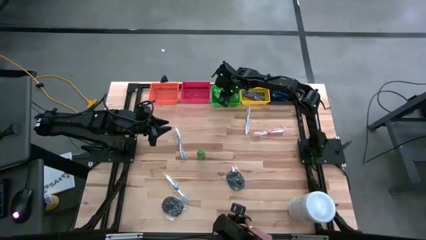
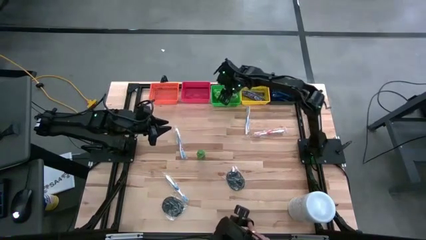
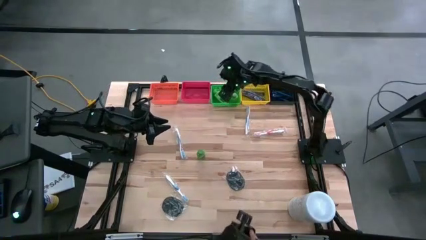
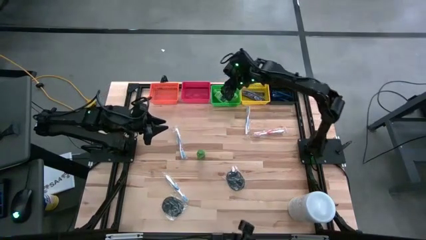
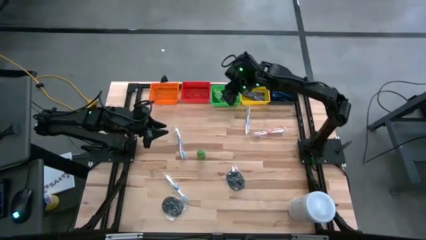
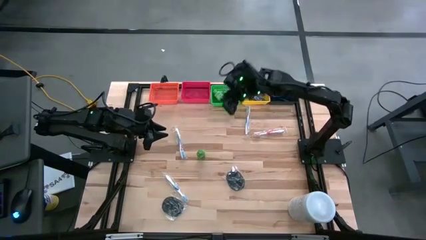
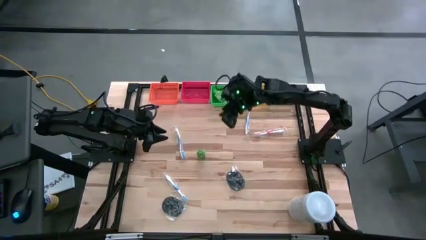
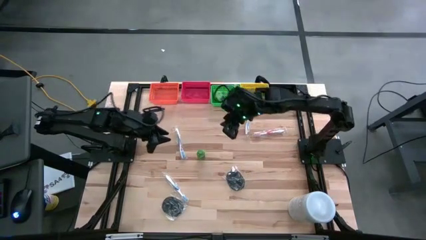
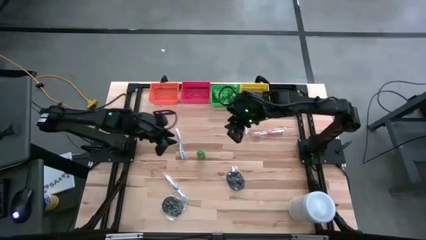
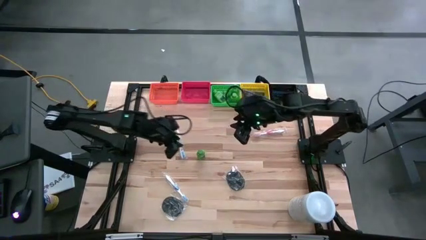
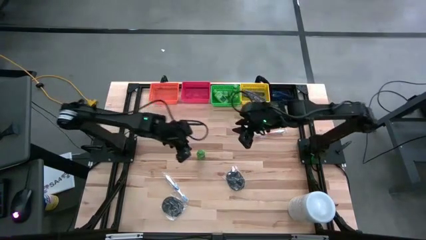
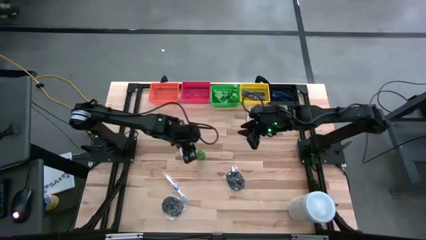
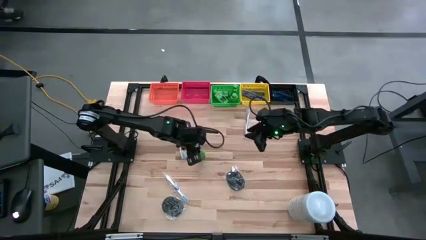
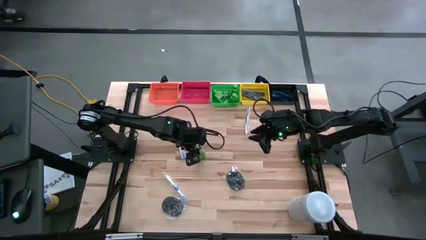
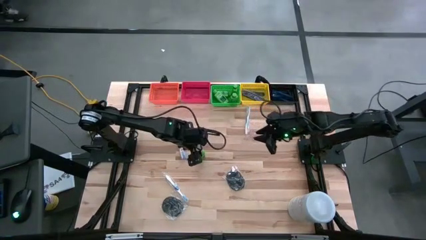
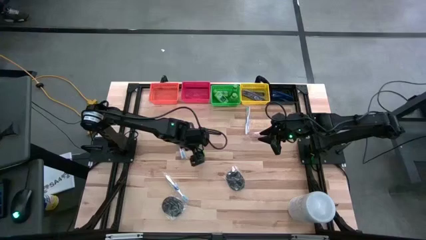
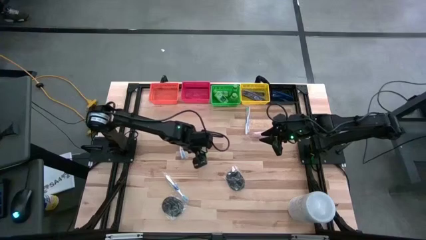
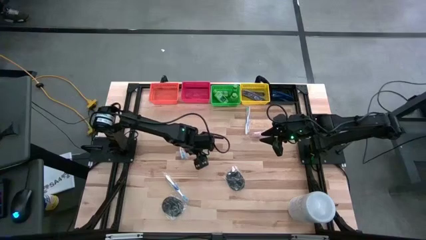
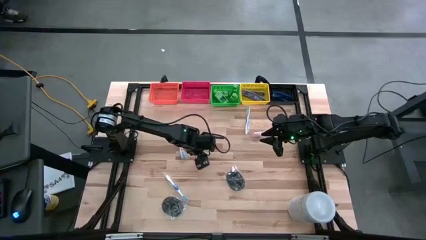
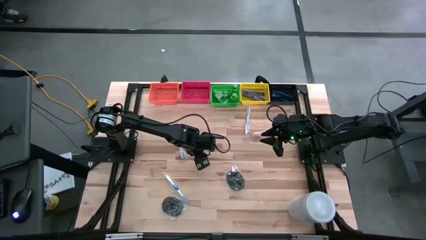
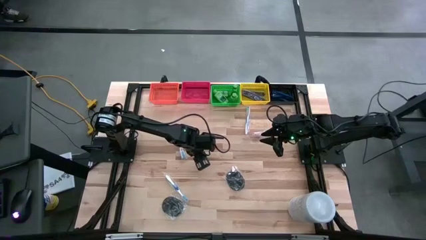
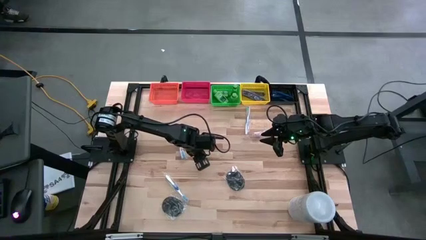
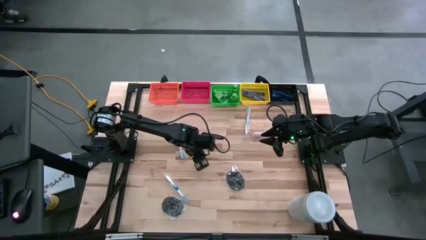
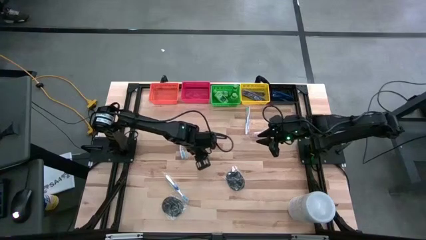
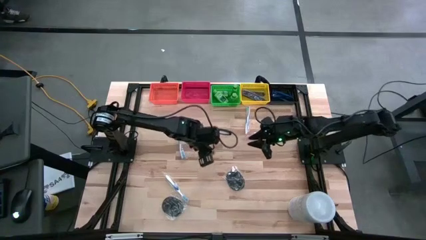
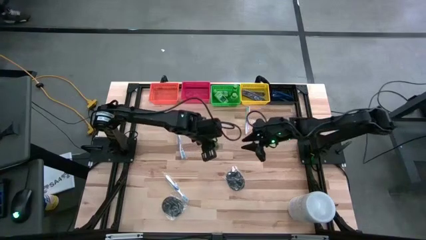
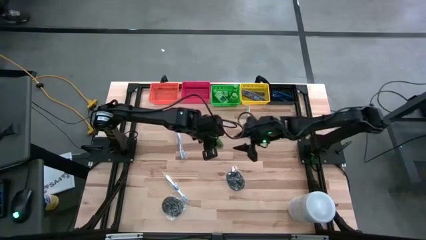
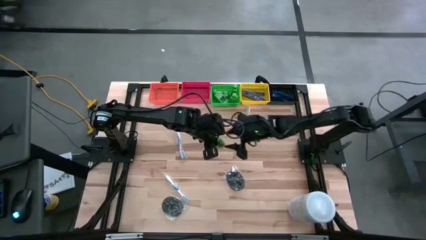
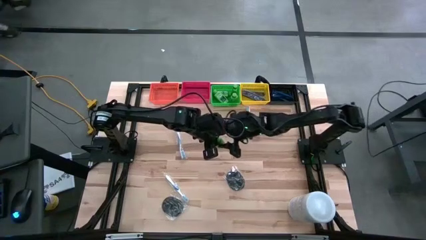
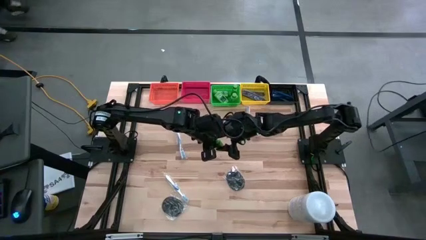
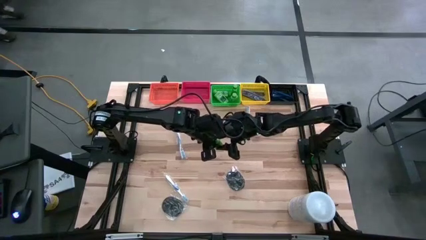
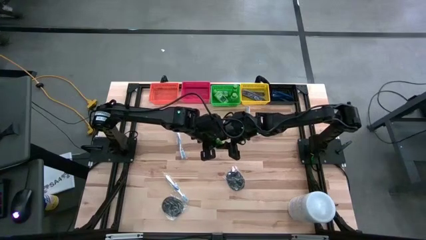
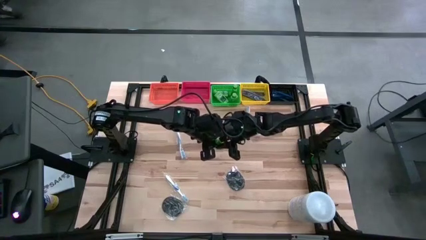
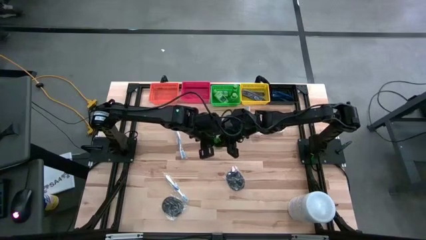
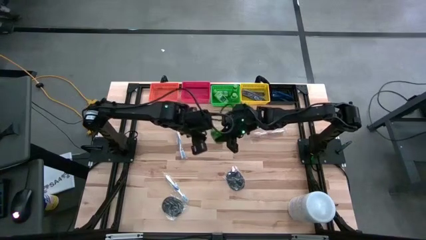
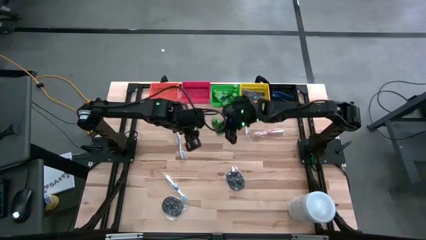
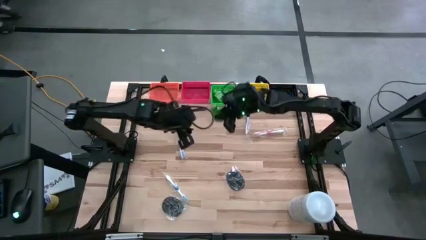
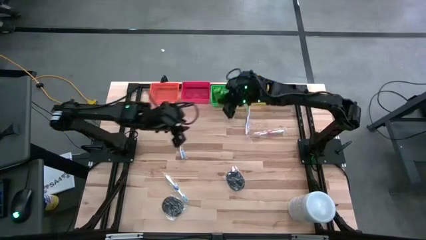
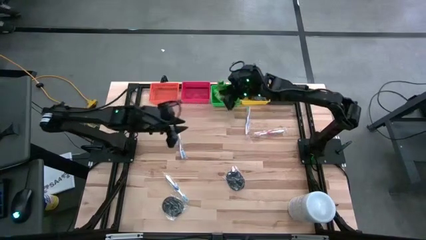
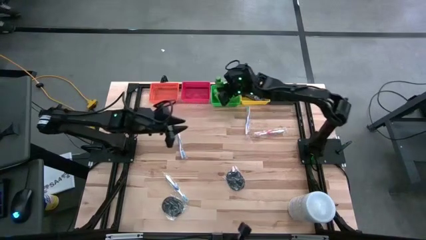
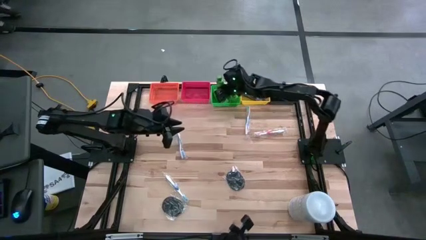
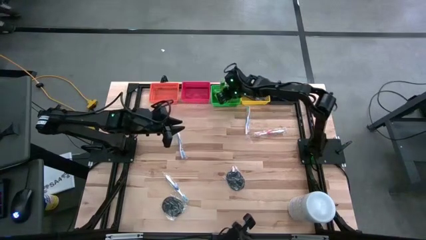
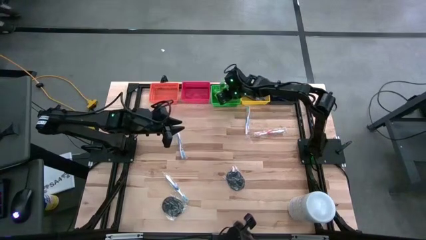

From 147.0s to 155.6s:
Task: Pick & Place Travel size toiletries
Put the green shampoo into the green bin

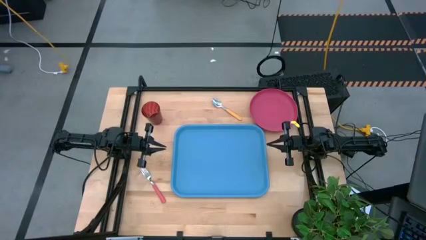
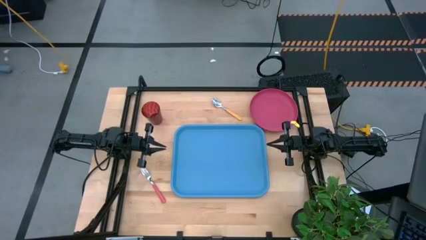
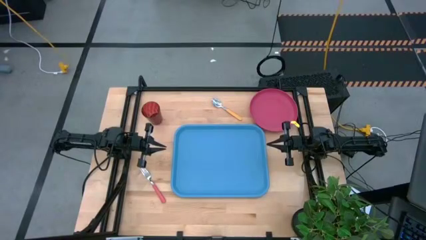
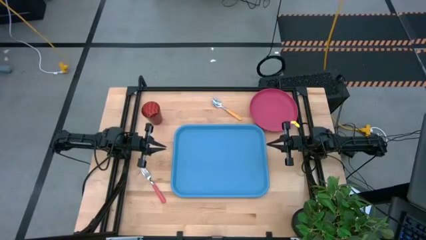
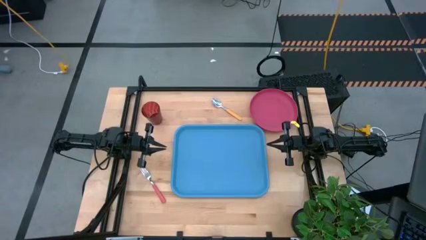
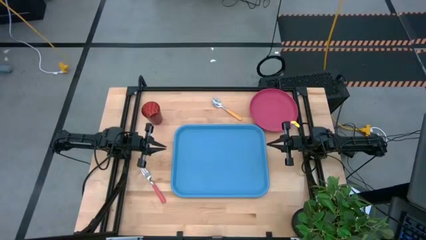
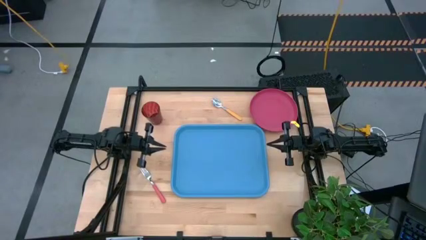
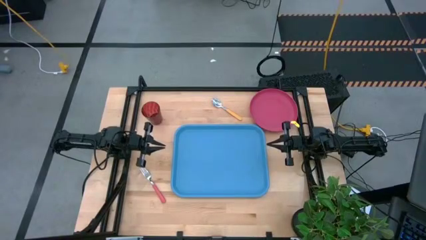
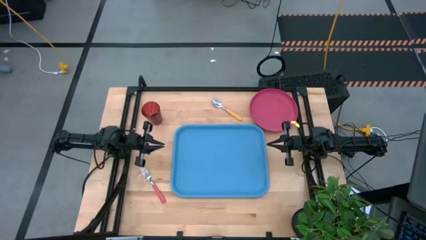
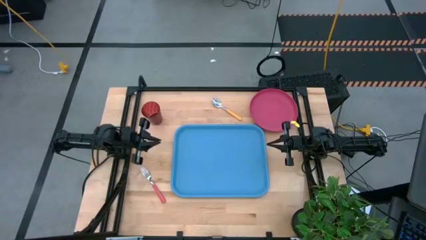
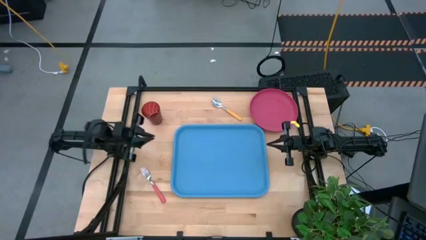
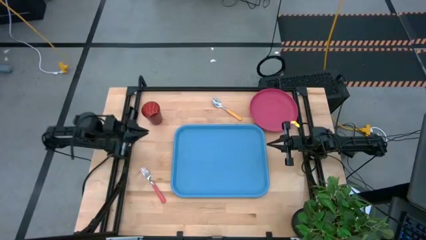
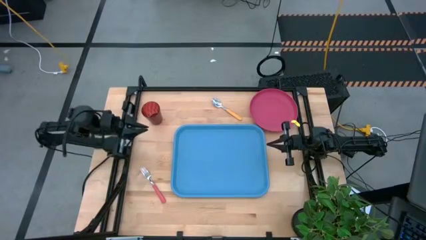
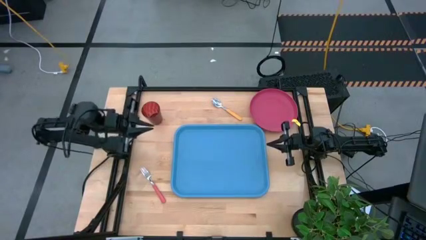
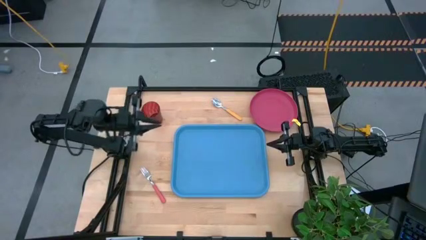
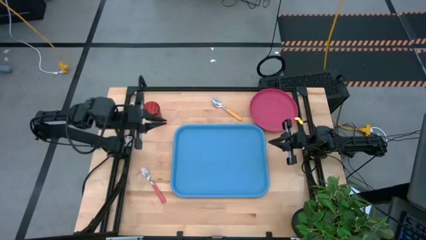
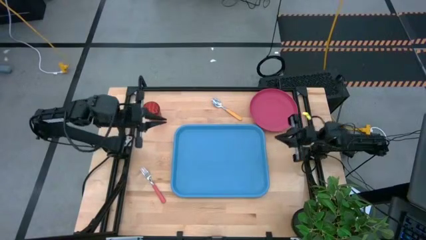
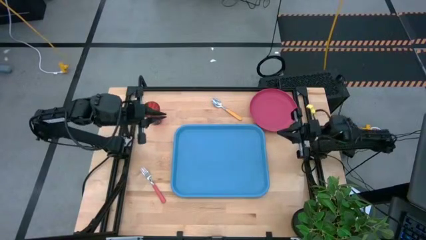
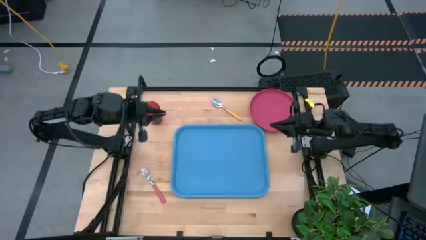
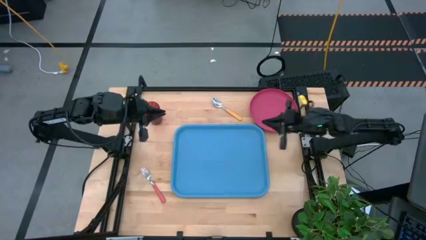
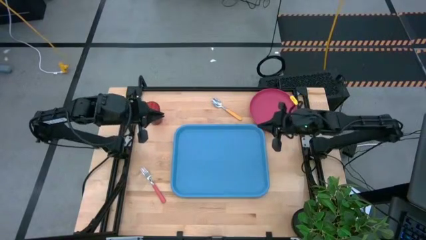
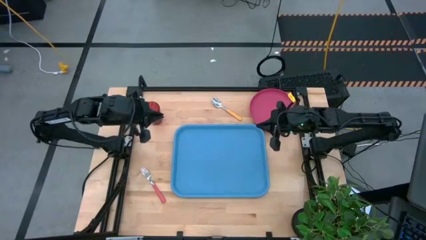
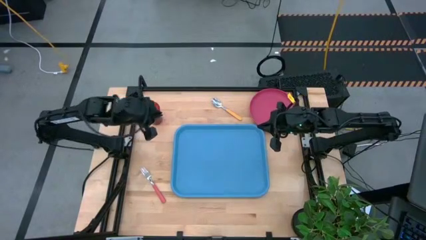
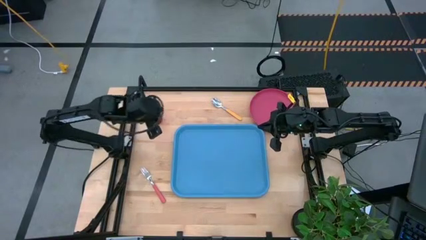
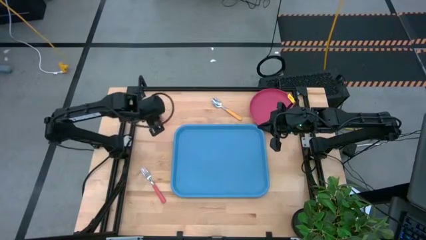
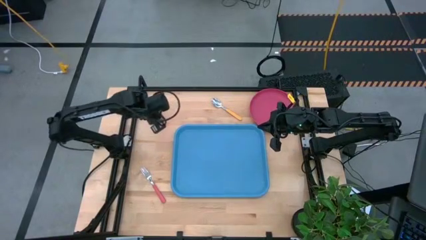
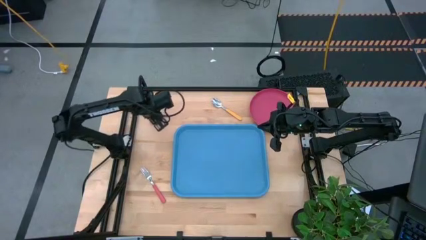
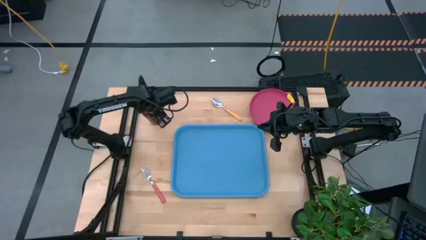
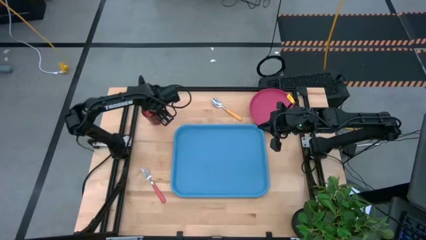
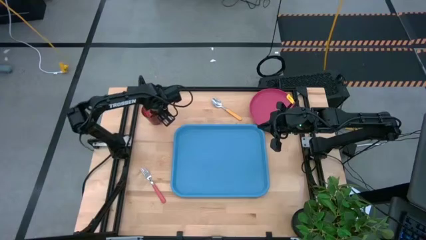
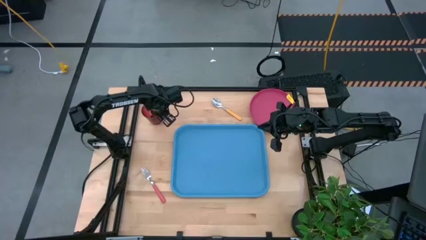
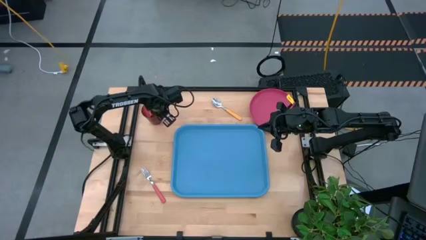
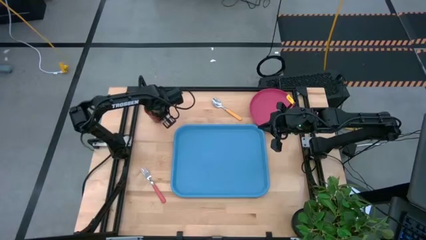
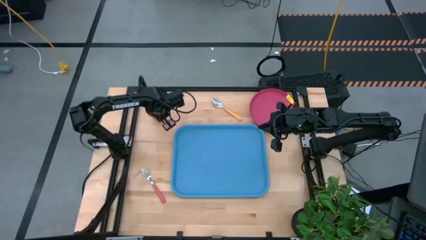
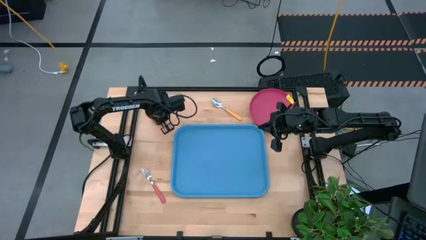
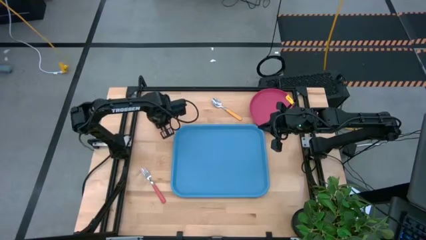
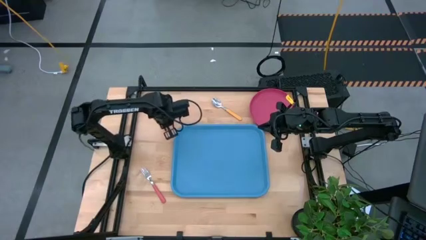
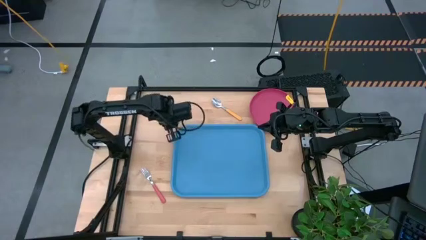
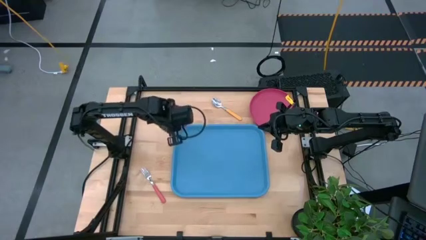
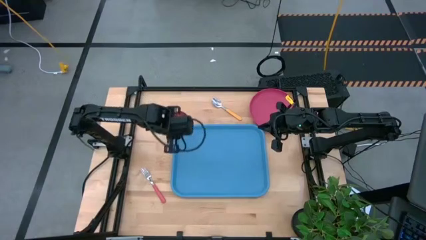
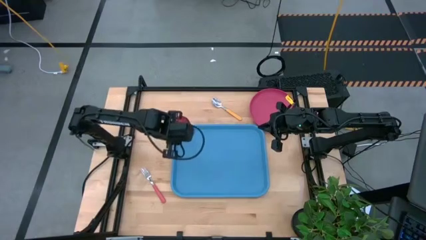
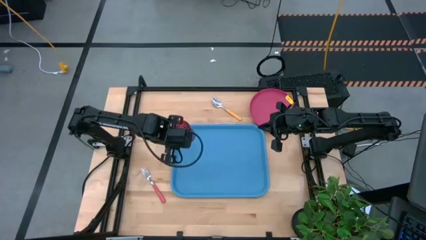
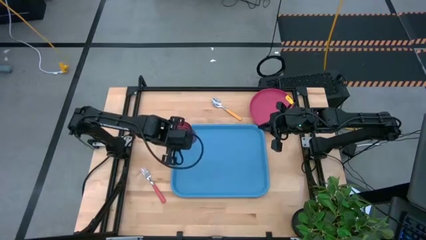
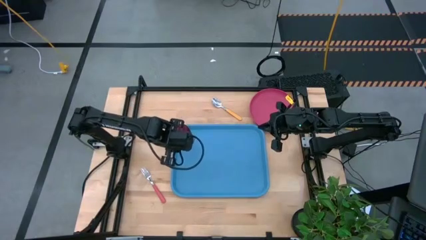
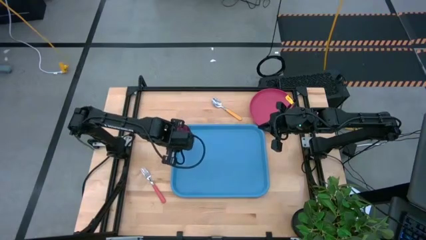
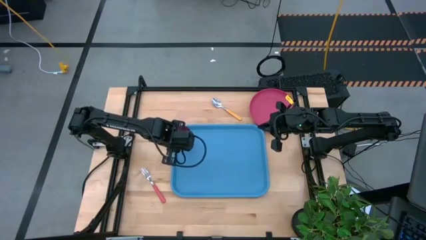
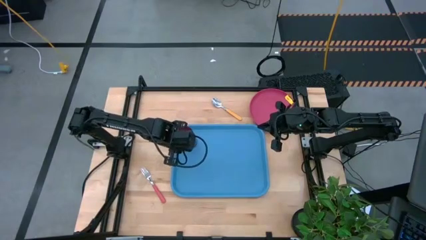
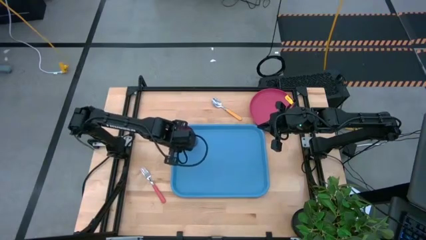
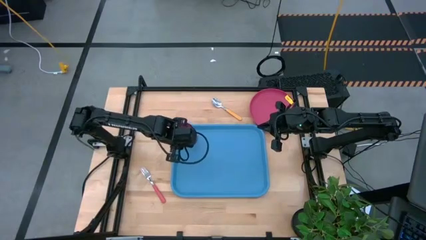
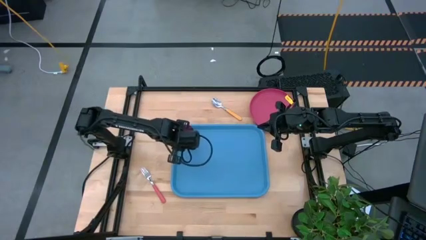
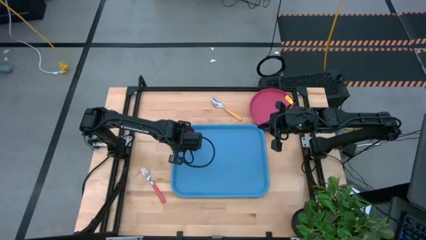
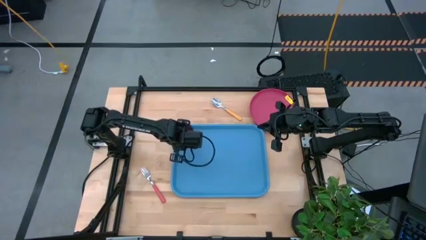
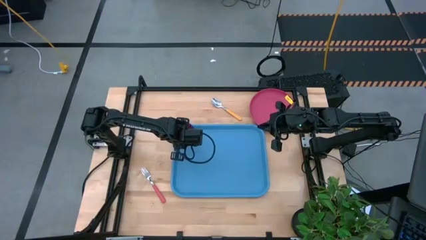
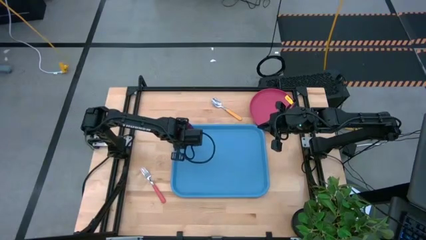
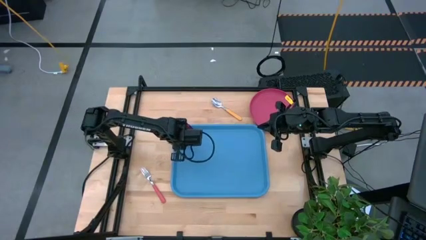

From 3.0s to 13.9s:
Task: Pick and place plate/cup/fork/spoon on tray
Put the red glass on the blue tray
